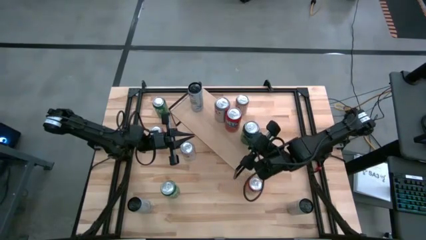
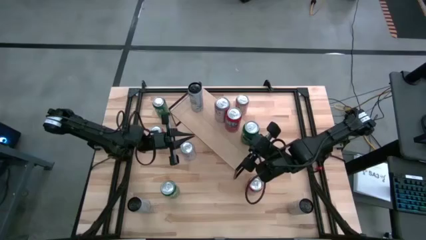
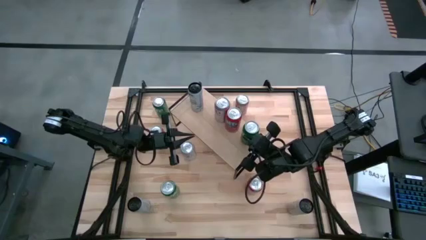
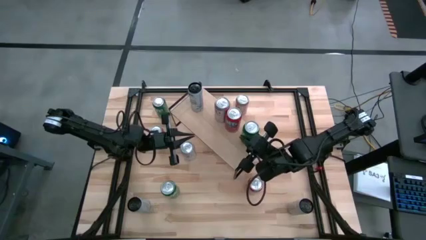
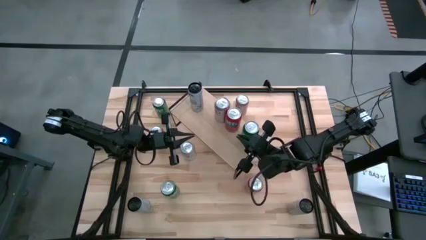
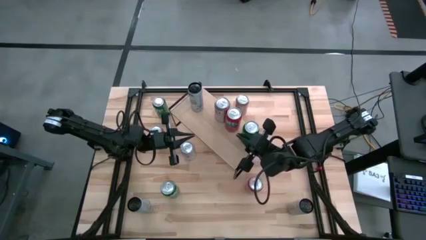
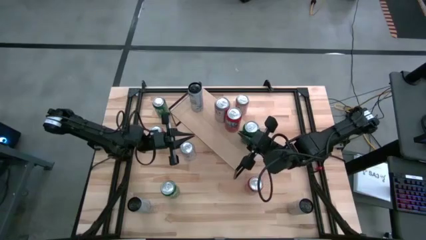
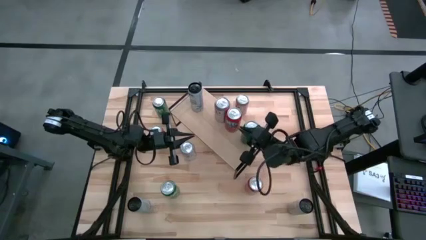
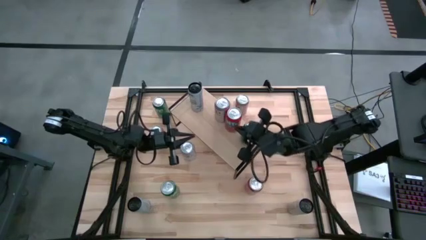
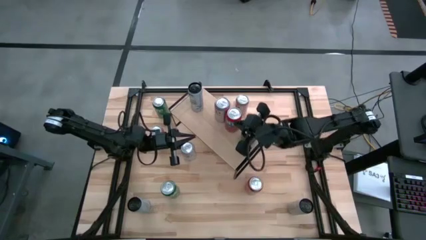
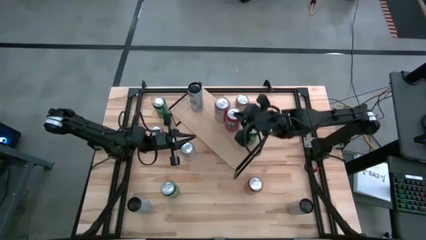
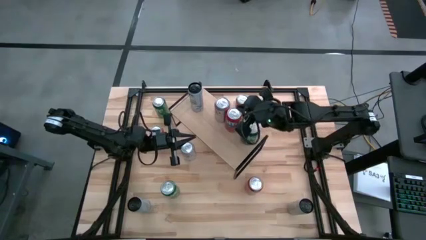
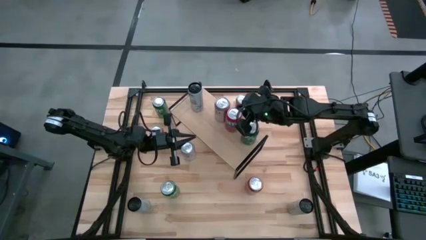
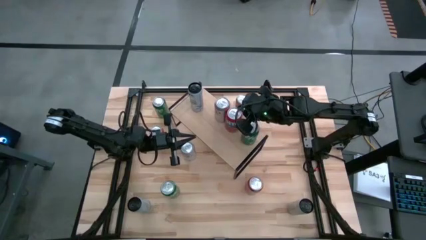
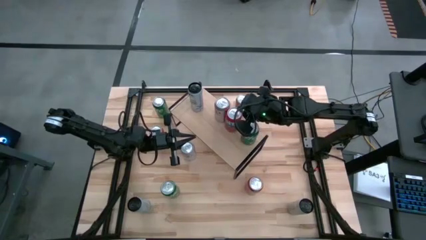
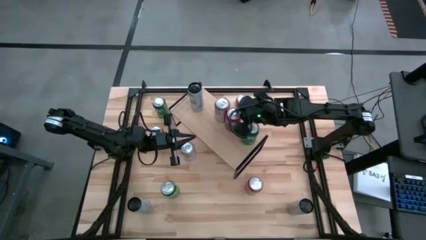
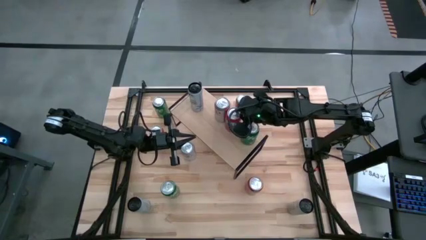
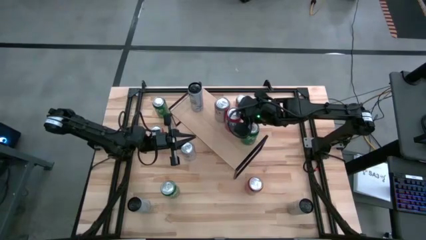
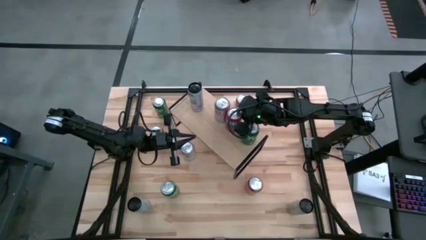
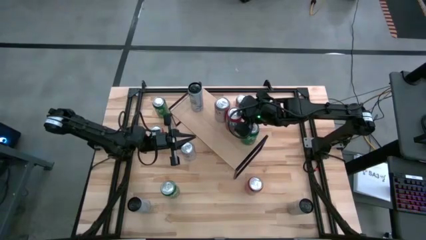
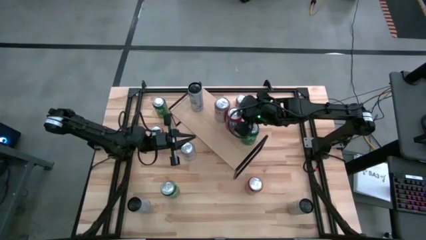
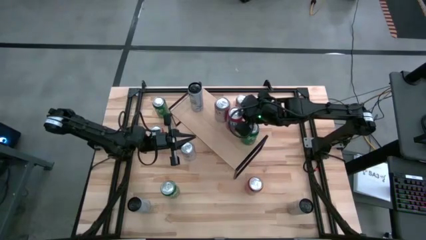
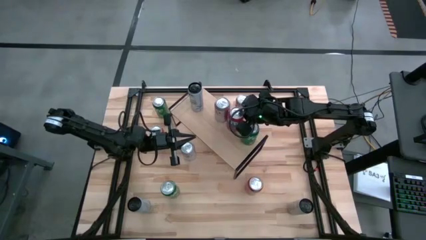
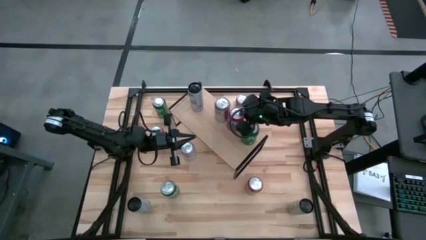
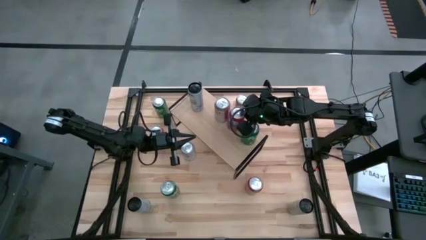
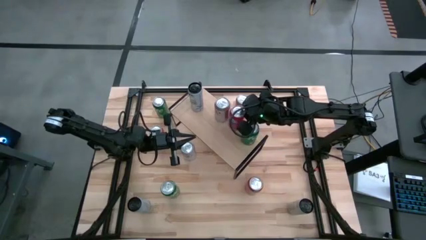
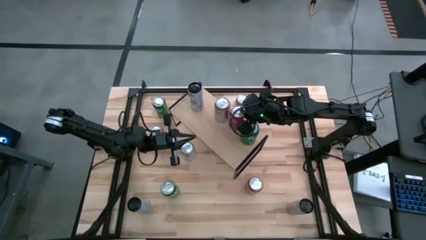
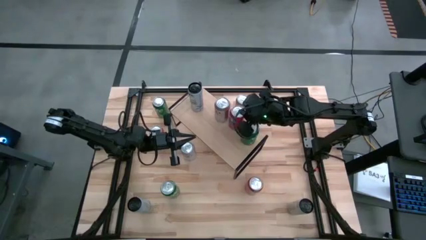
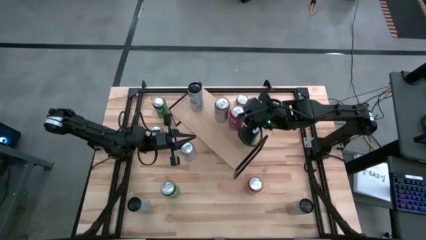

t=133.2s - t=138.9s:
Task: Place canned beverage on shelf
Adjust the orange soda can on the shelf

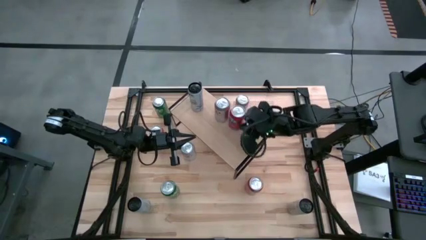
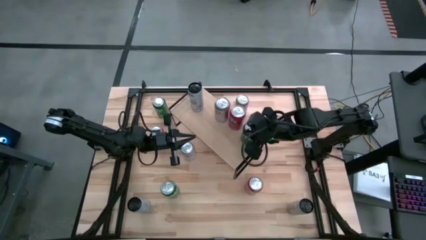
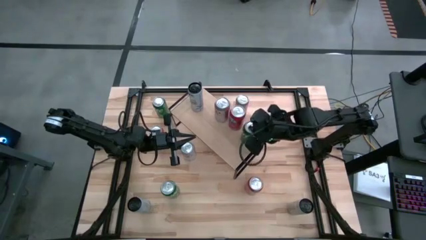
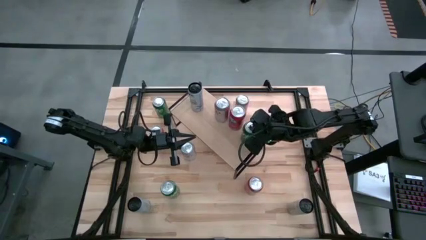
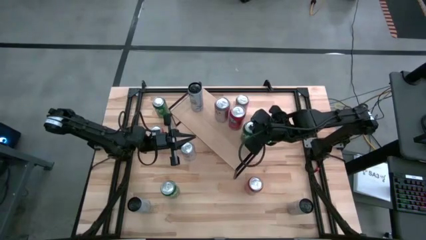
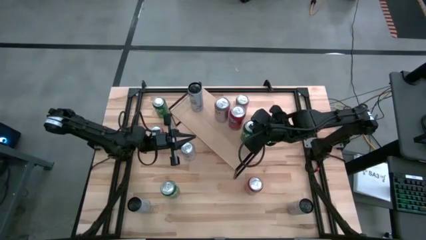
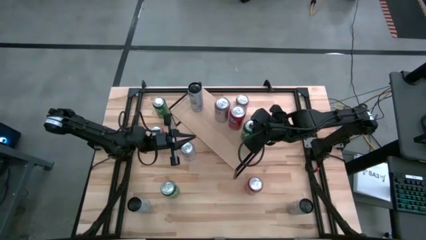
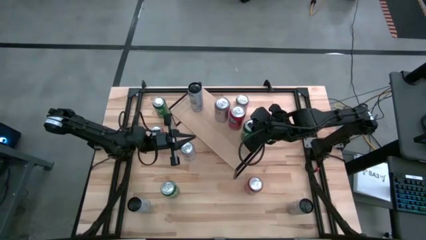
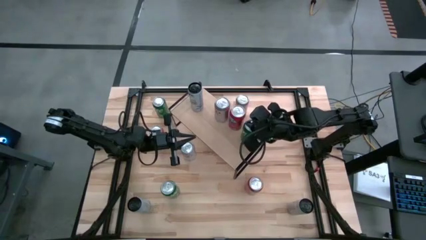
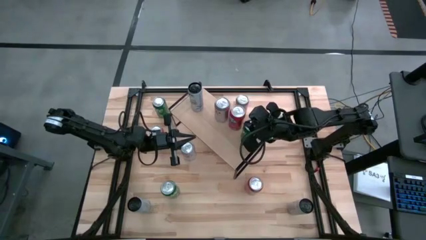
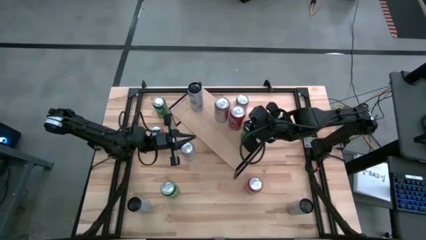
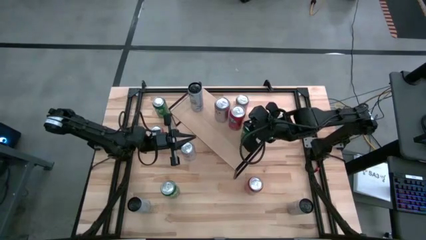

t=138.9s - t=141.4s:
Adjust the green soda can on the shelf

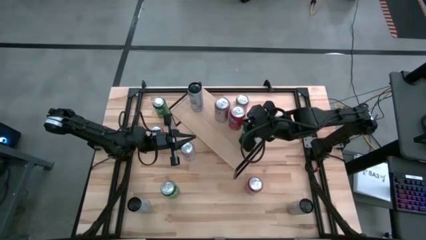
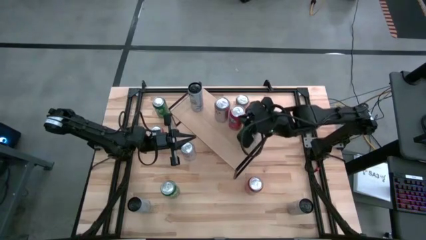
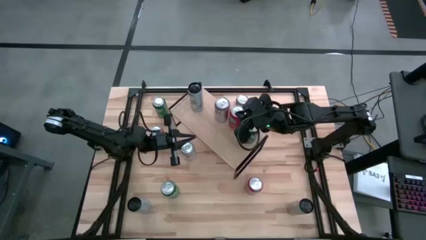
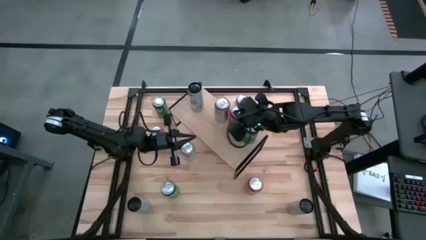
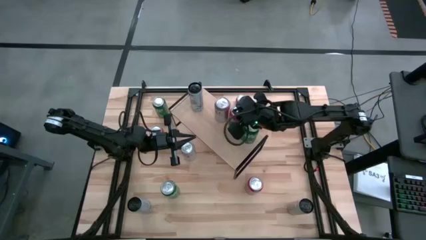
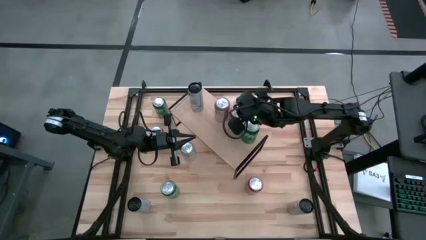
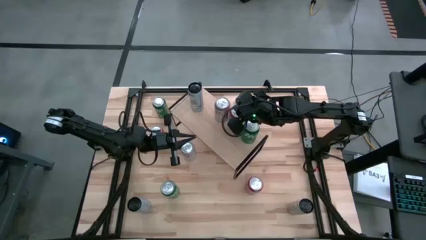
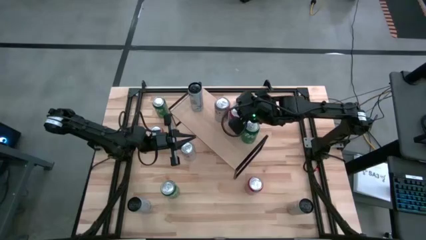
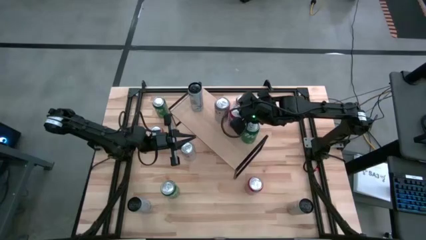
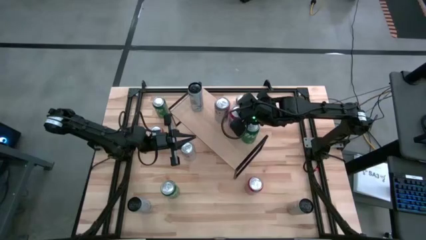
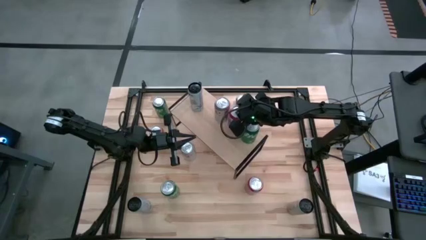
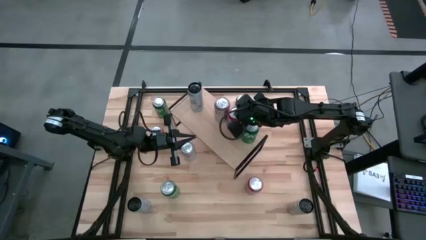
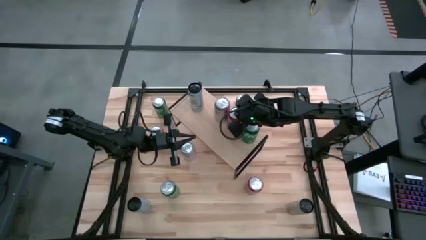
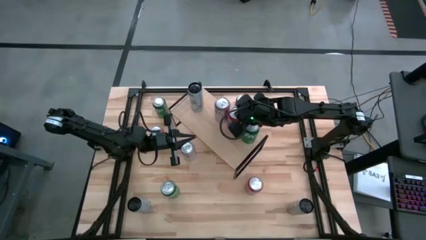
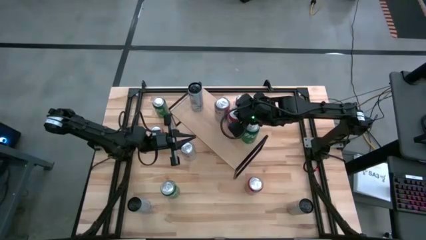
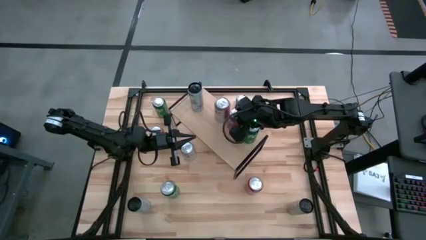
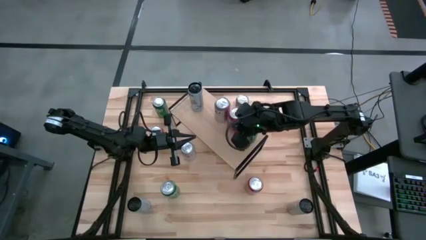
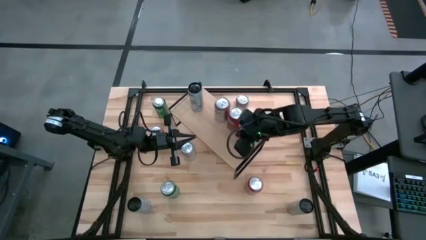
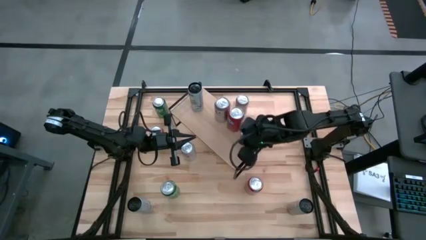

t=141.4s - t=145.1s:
Adjust the orange soda can on the shelf

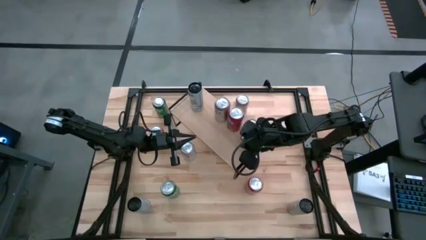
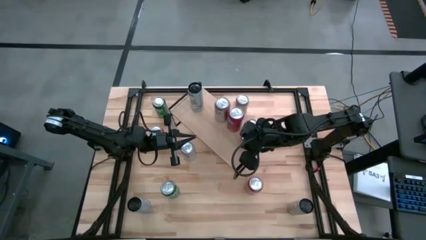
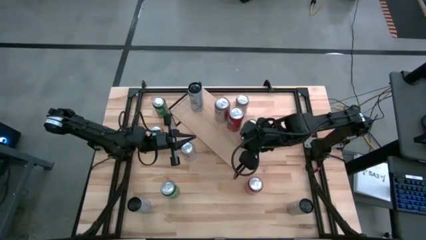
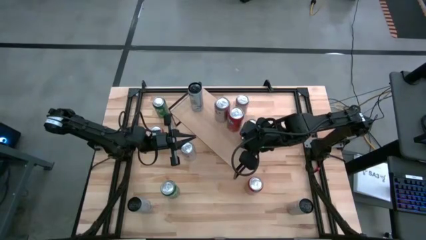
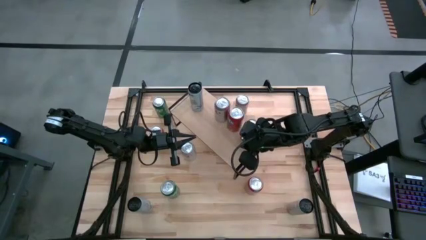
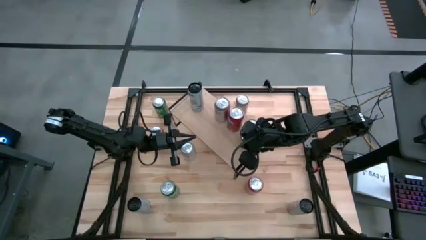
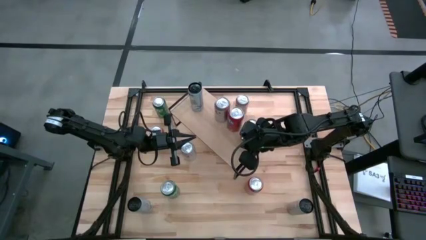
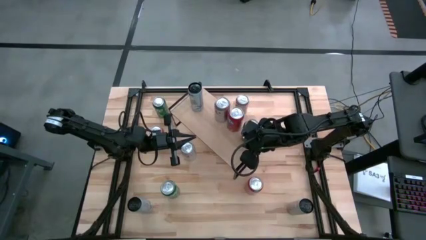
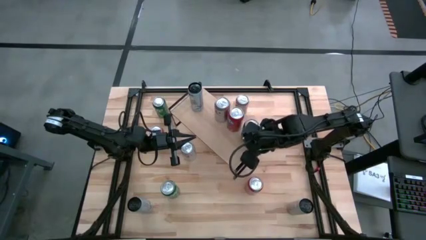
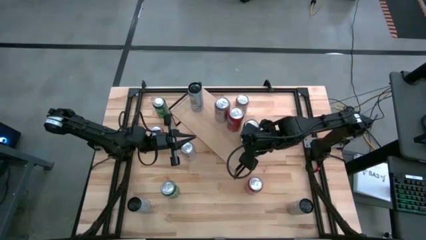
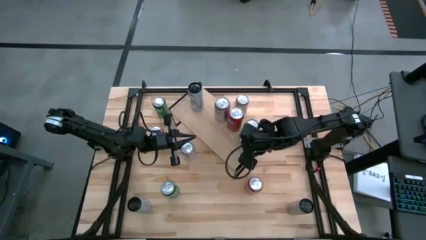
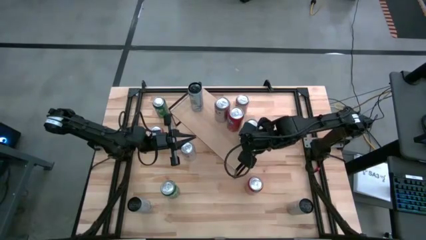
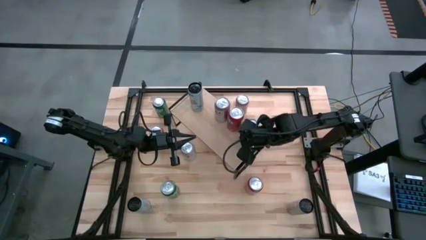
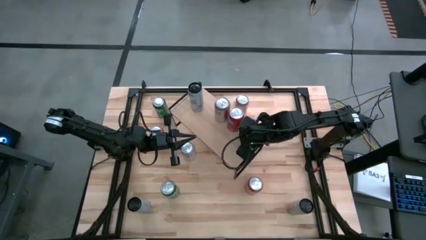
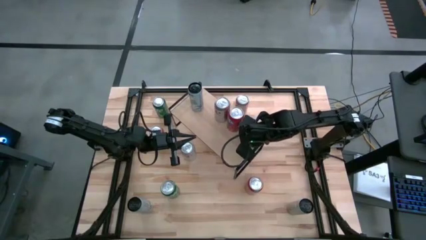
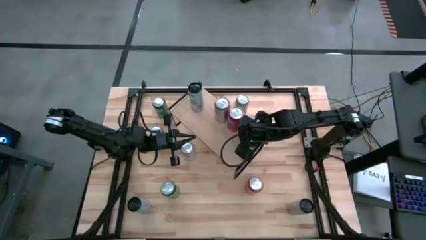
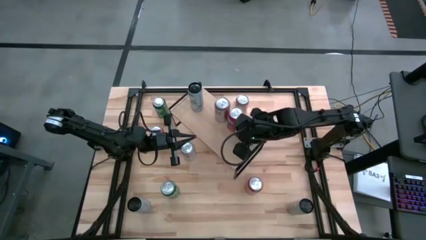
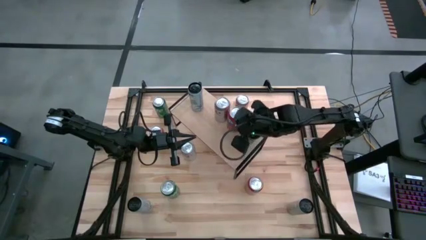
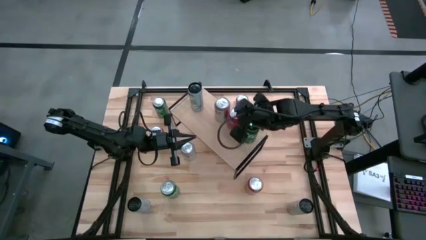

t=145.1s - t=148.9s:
Adjust the green soda can on the shelf

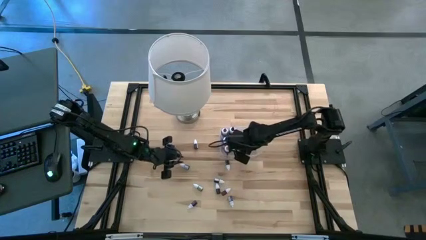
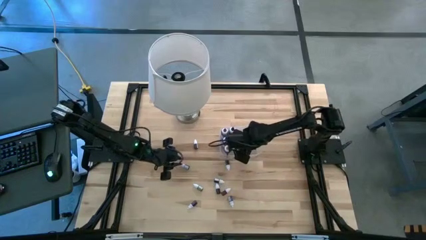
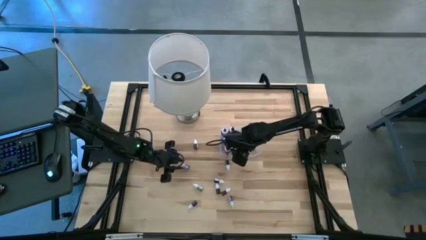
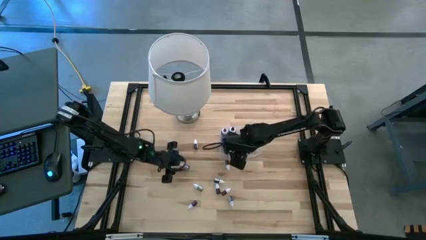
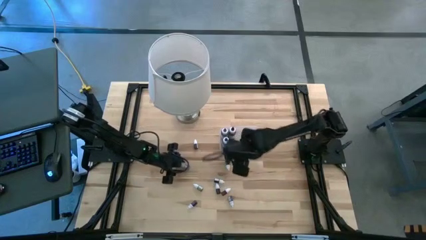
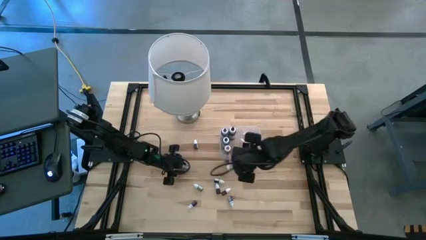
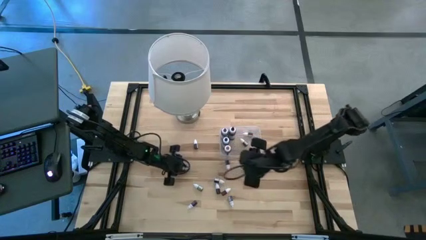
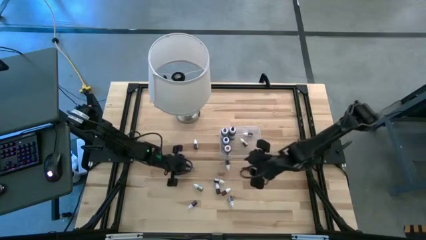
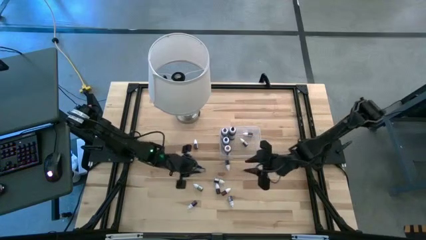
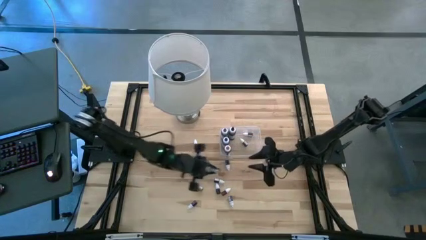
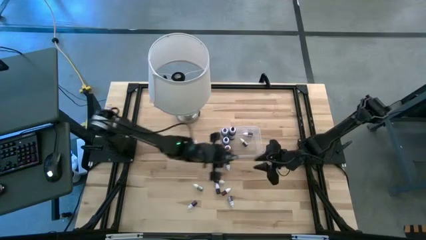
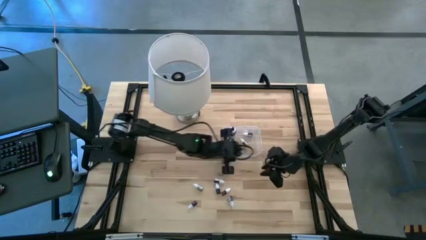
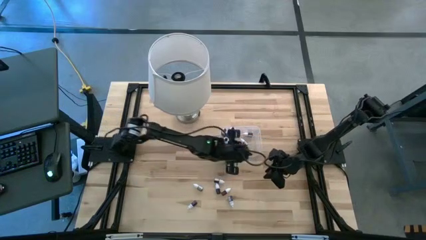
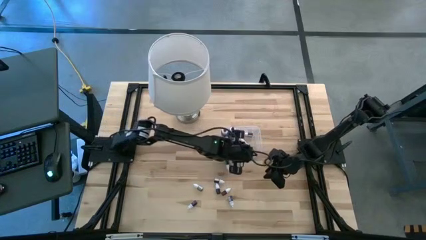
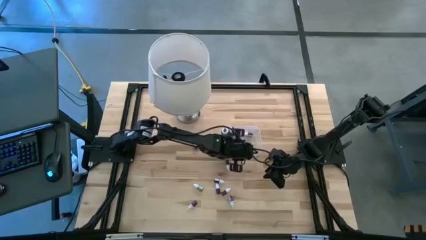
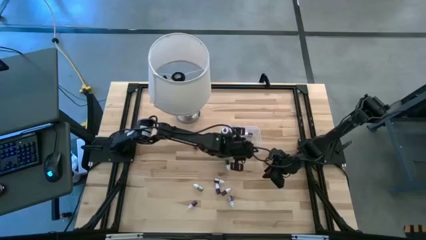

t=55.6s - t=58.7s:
Task: Pick & Place food coloring
Put the small blue food coloring bottle into the transparent bin
